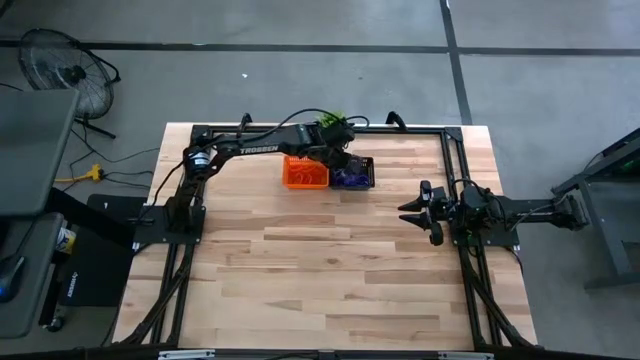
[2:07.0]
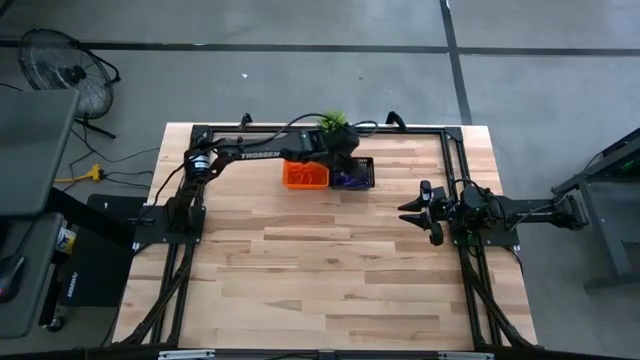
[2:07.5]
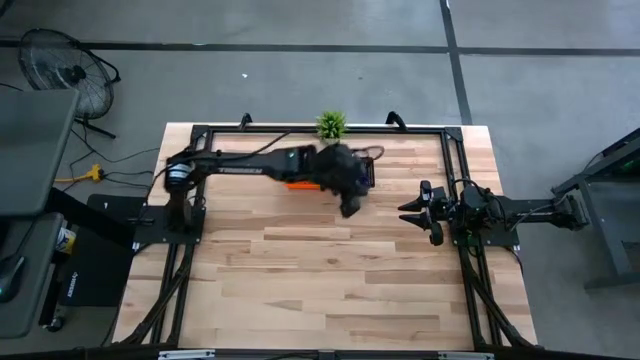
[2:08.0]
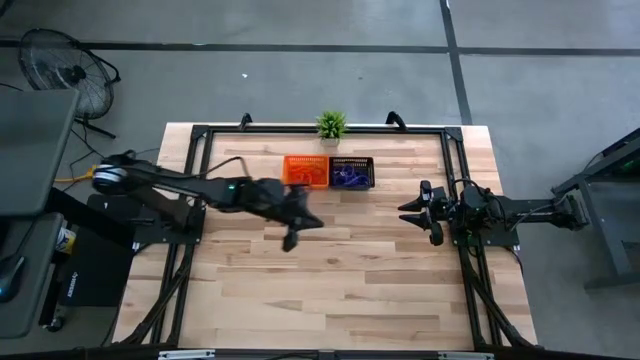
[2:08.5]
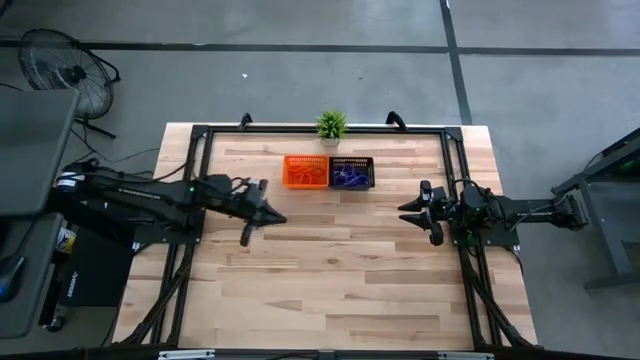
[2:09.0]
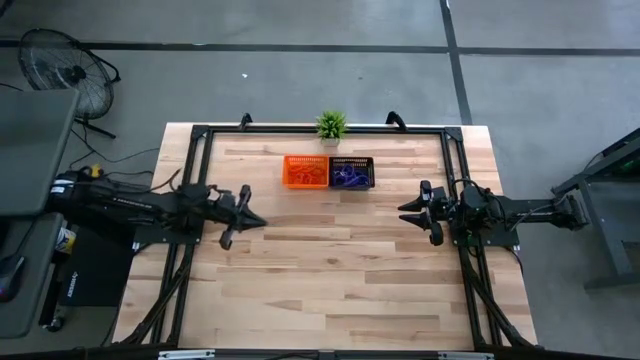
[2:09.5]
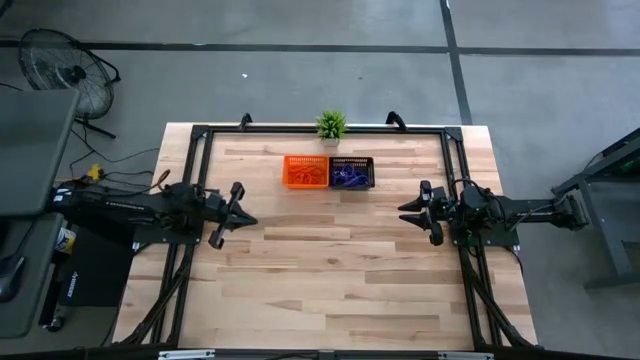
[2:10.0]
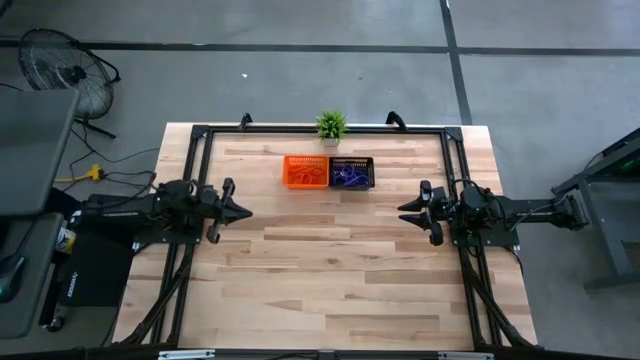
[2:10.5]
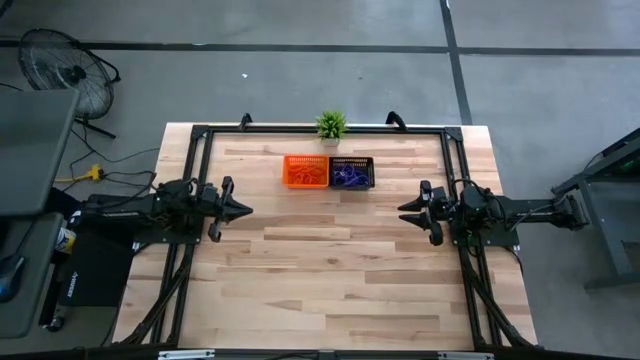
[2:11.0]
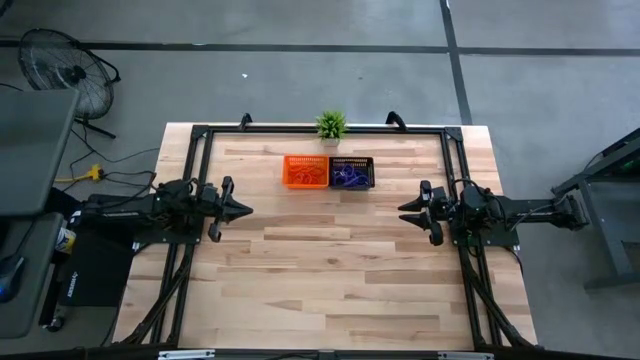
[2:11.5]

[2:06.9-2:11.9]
Task: Sort spring keychains into baskets
Return to Home Position

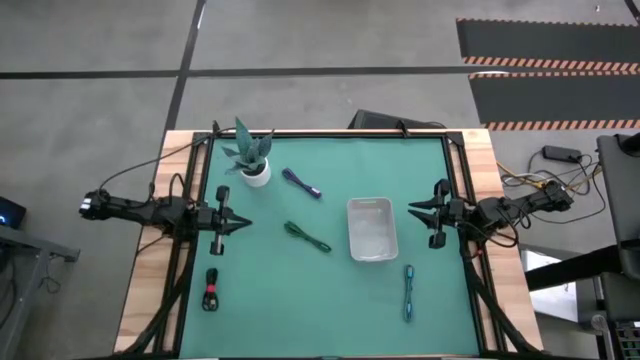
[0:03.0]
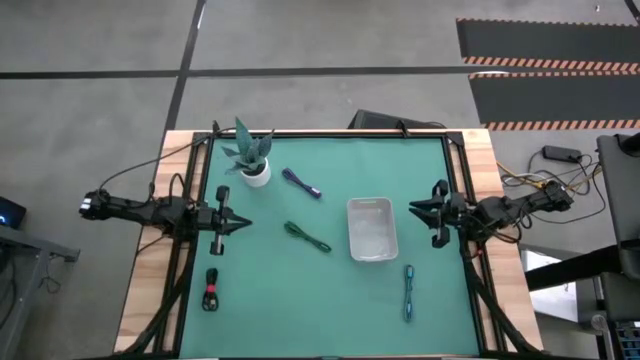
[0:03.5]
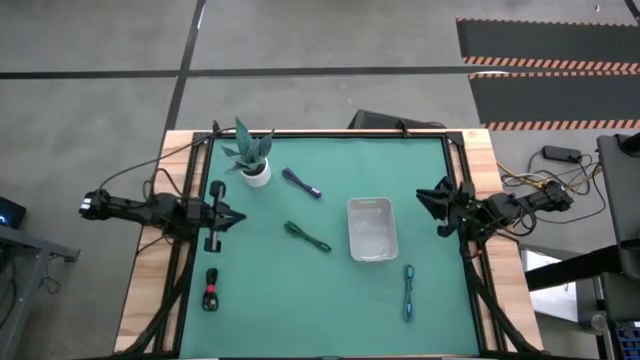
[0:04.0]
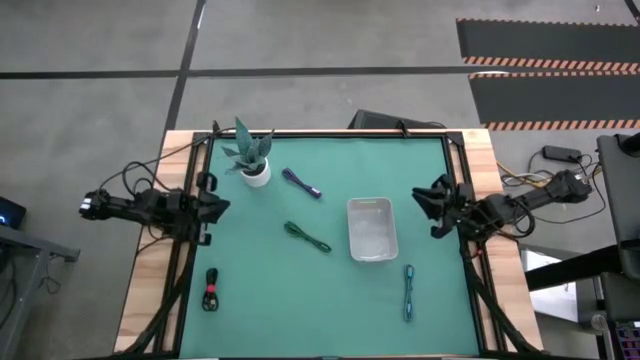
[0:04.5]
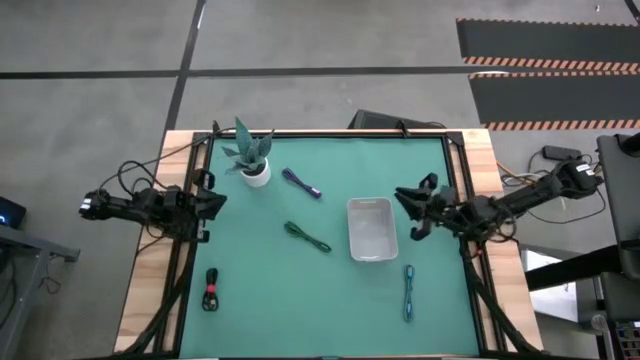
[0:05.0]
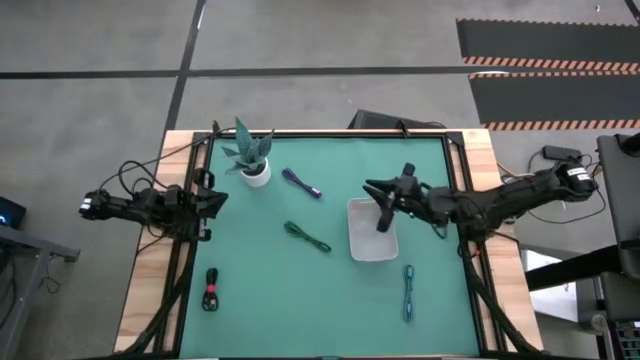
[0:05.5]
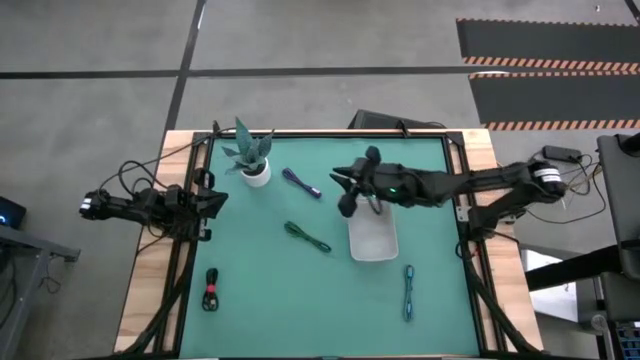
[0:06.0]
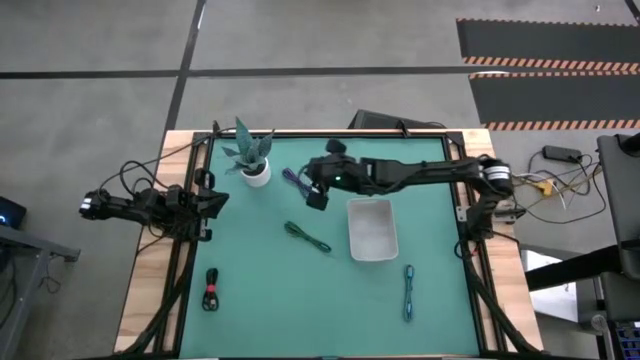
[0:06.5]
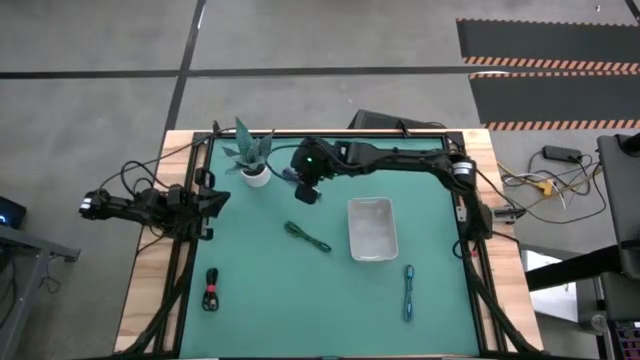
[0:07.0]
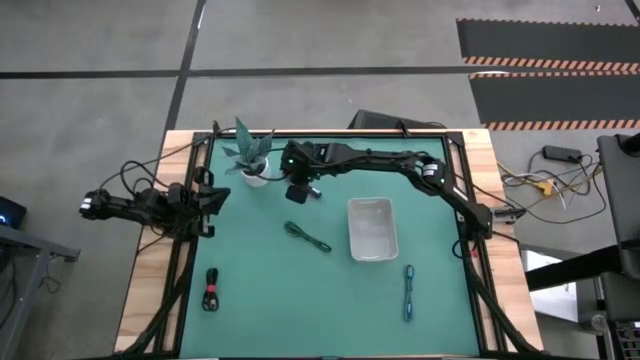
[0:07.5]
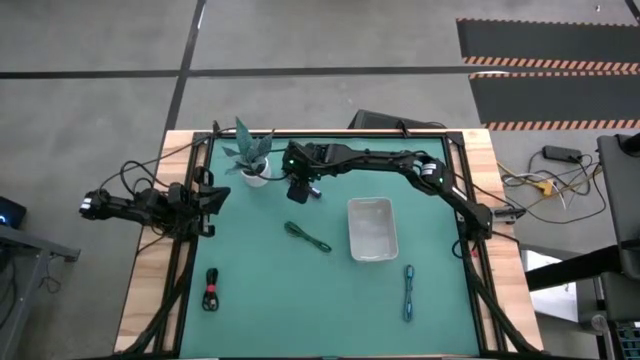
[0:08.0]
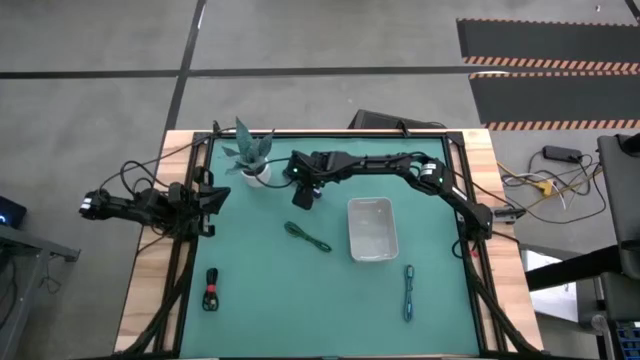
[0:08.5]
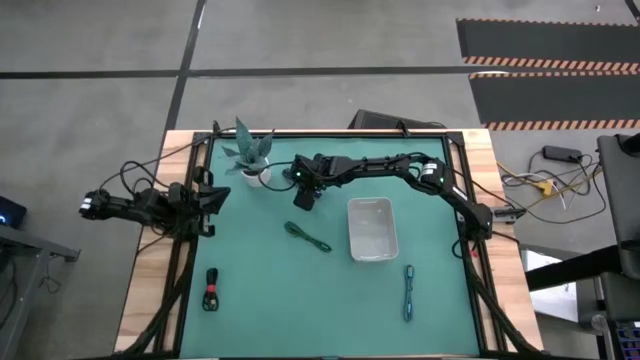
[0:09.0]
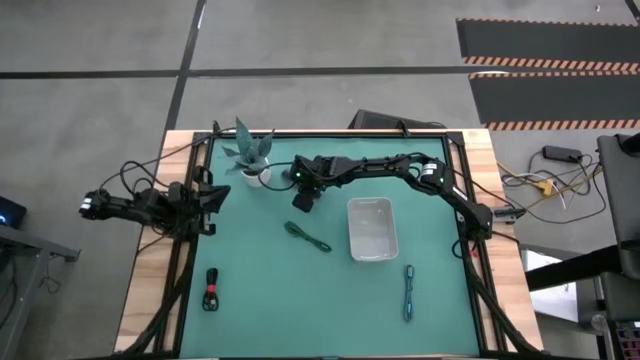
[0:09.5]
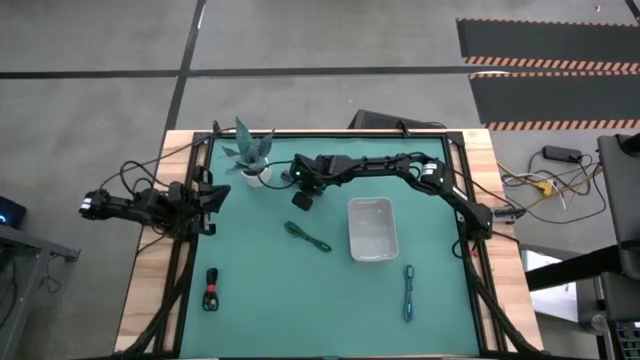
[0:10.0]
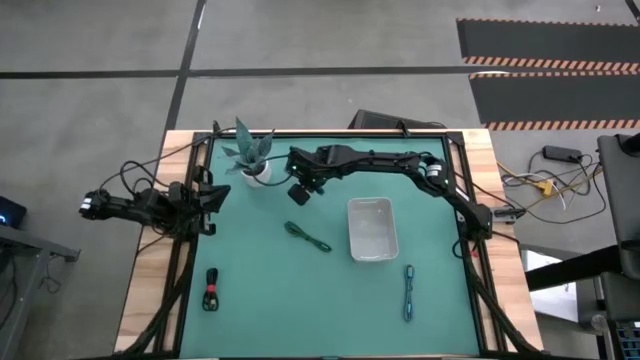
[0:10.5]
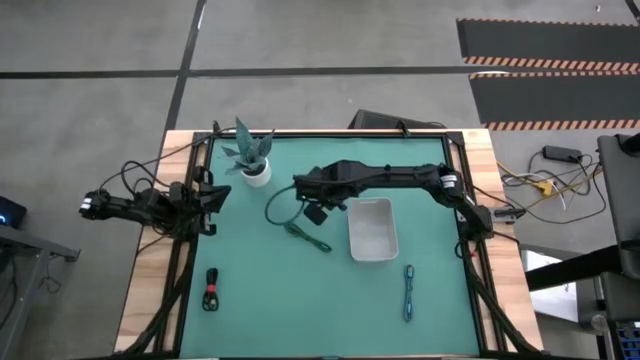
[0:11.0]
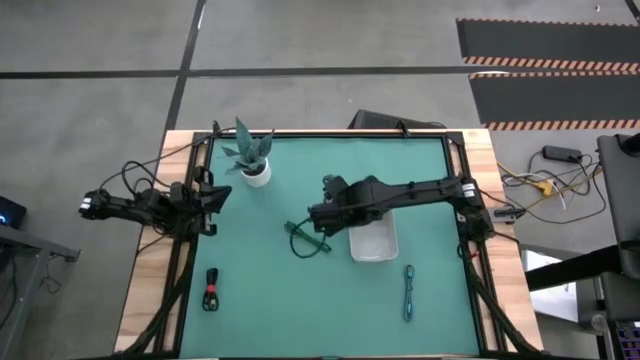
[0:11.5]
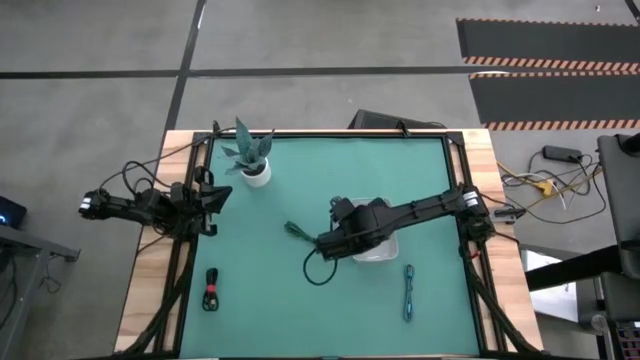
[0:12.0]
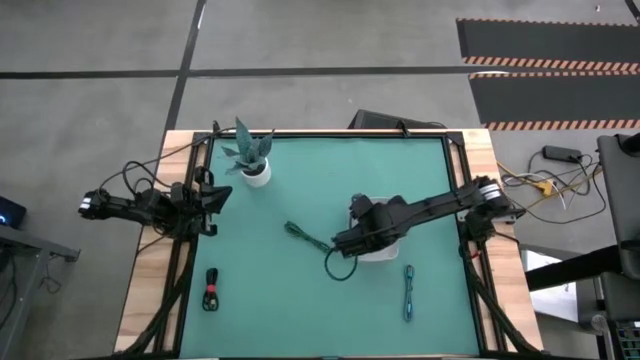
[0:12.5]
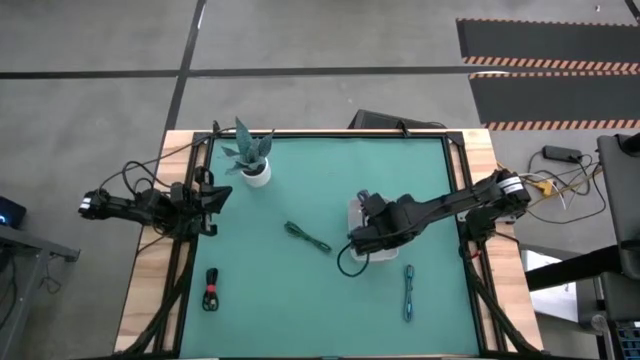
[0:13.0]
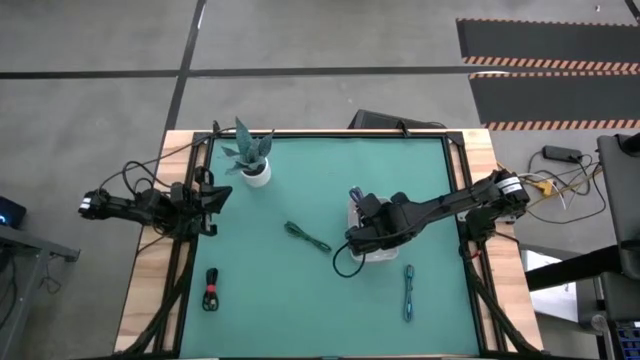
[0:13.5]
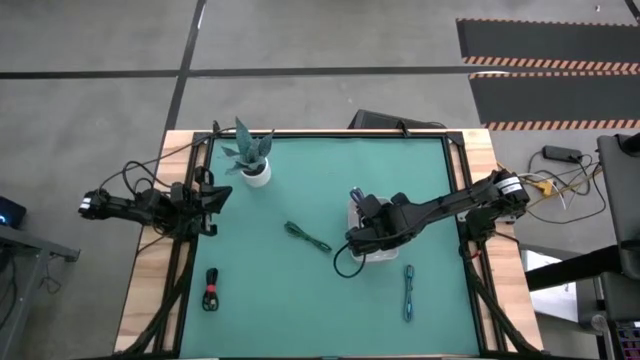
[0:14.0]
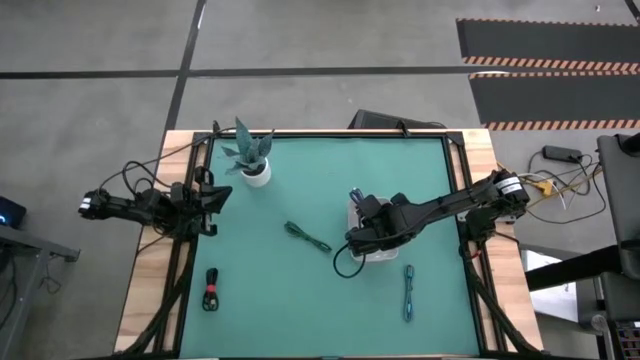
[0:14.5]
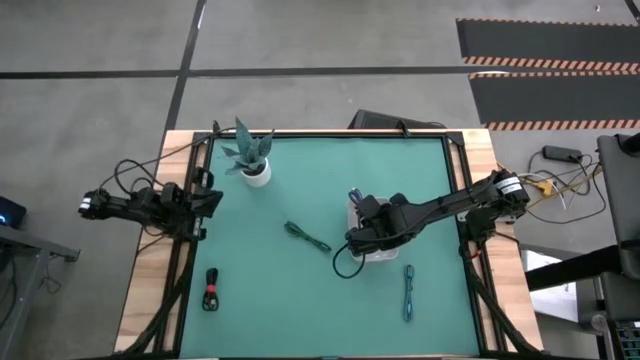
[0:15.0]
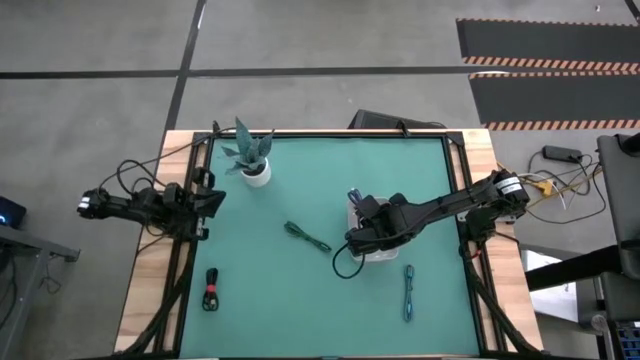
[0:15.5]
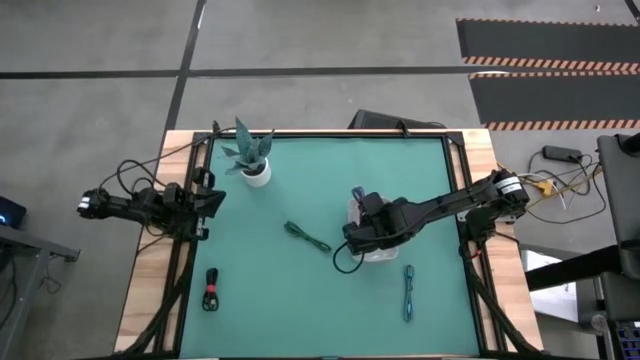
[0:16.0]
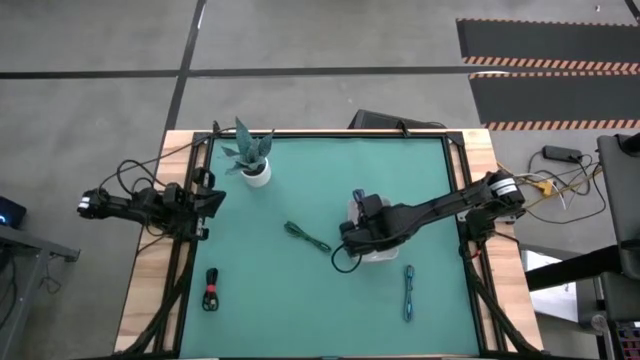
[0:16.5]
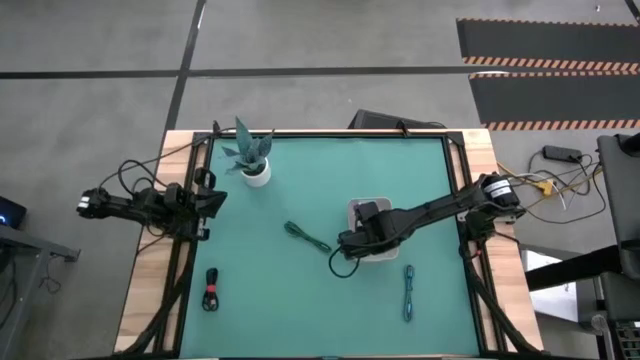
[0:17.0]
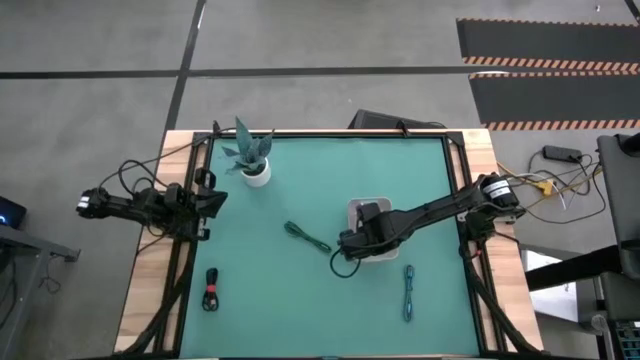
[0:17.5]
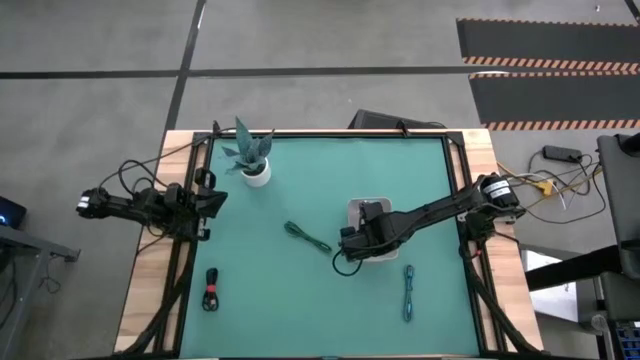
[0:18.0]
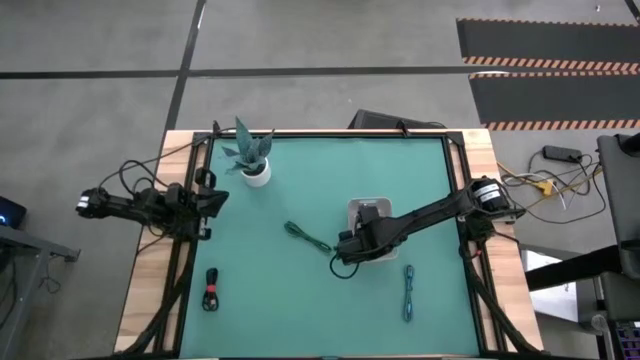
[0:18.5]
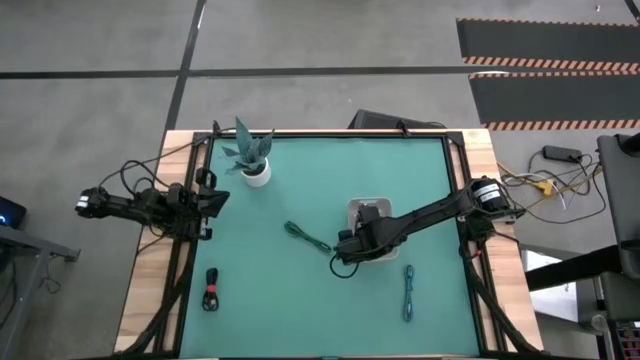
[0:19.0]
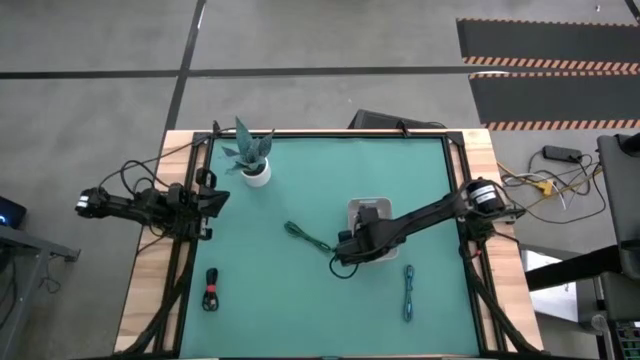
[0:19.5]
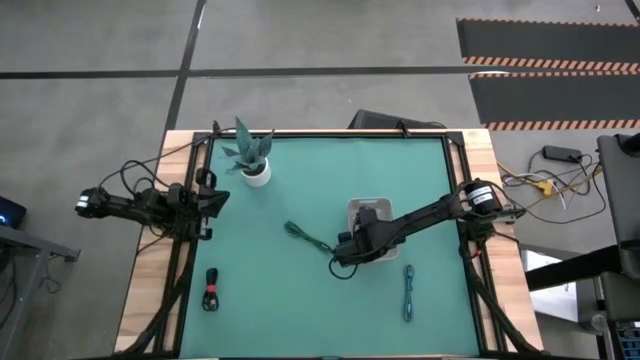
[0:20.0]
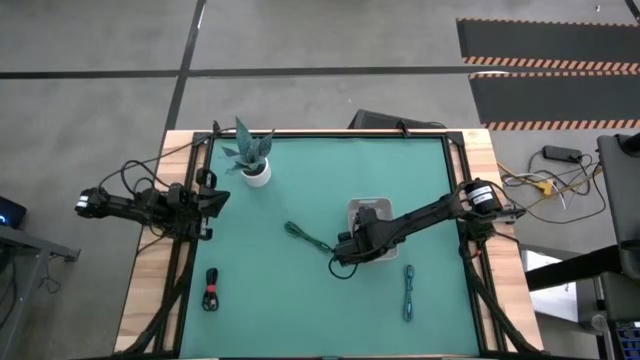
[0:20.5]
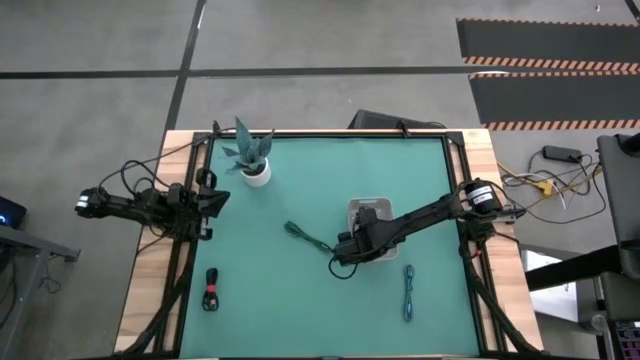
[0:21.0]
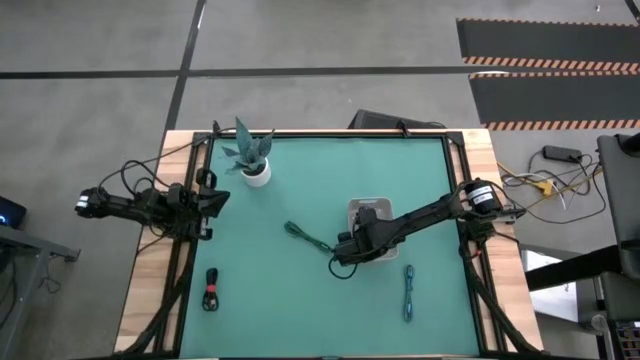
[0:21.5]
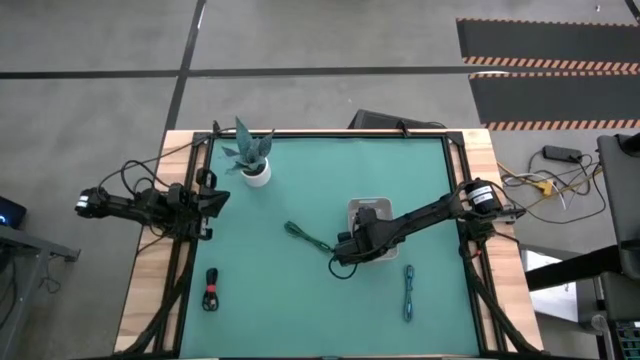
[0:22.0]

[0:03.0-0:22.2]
Task: Pick and place USB-C Cables
Put the violet charger cable into the gray bin
